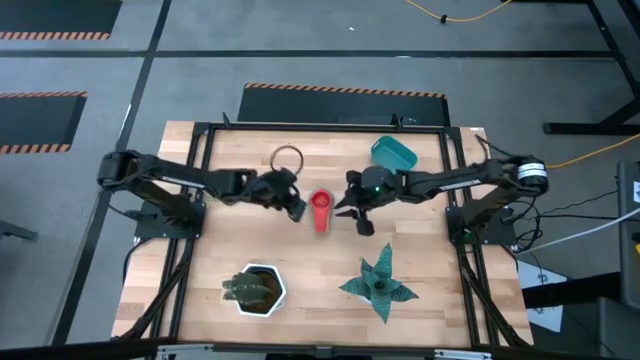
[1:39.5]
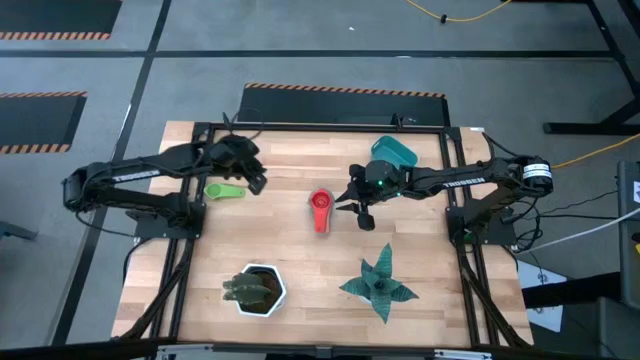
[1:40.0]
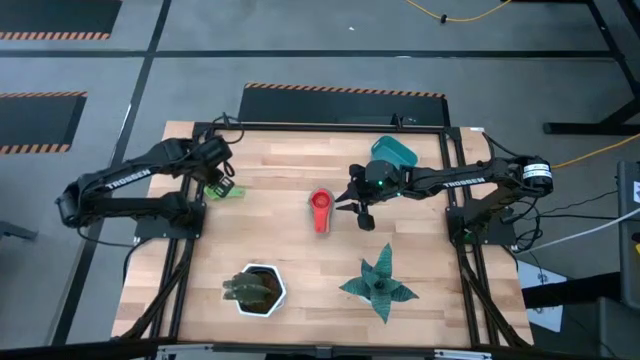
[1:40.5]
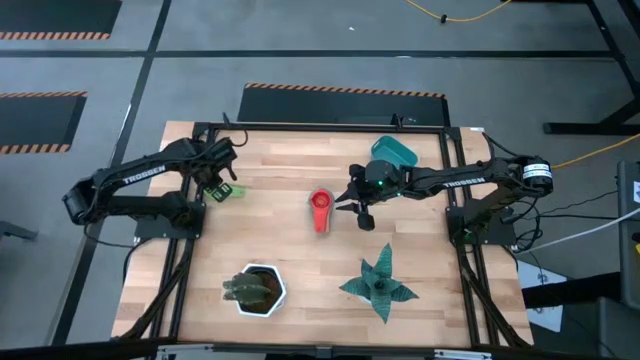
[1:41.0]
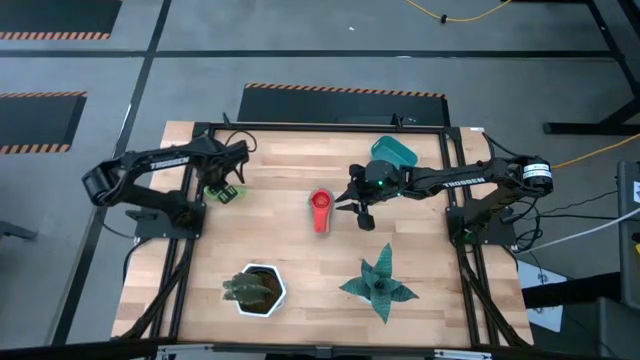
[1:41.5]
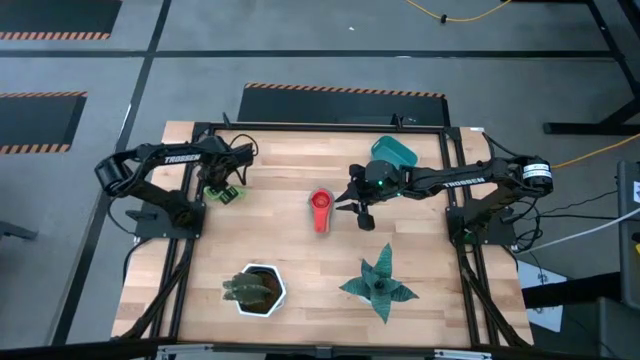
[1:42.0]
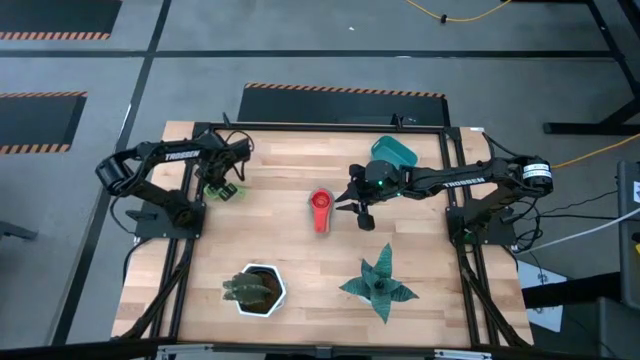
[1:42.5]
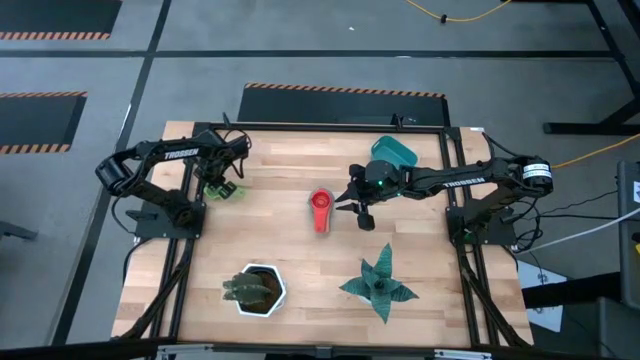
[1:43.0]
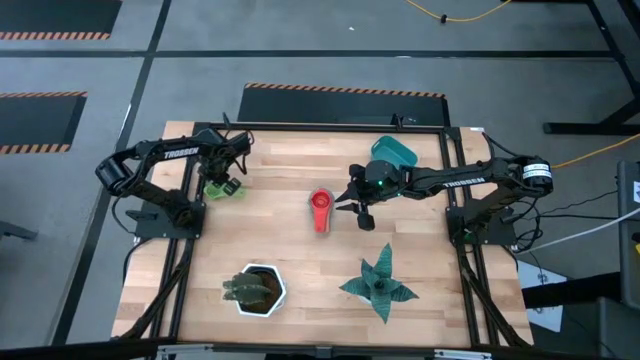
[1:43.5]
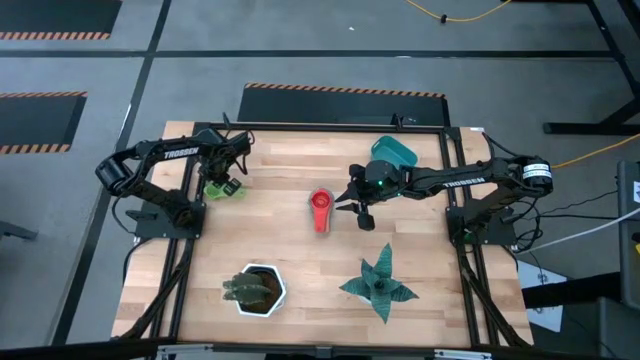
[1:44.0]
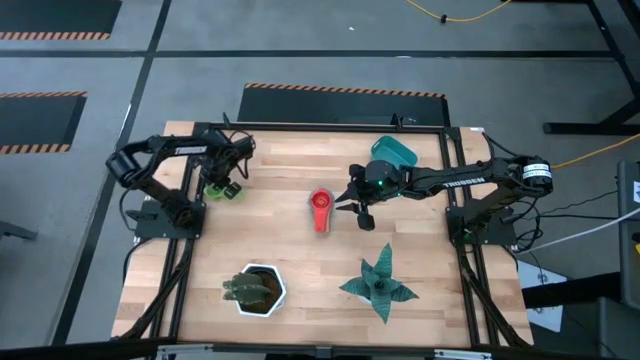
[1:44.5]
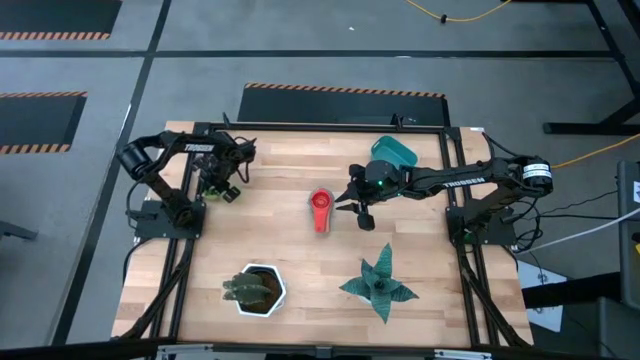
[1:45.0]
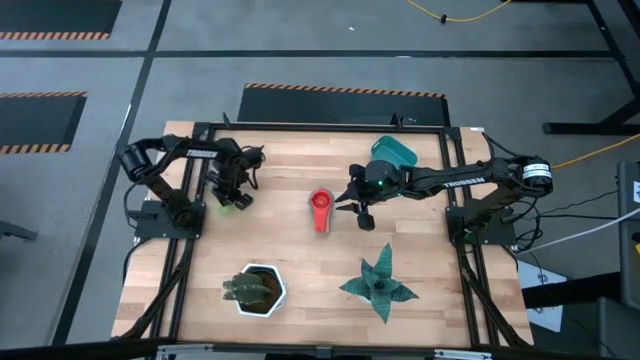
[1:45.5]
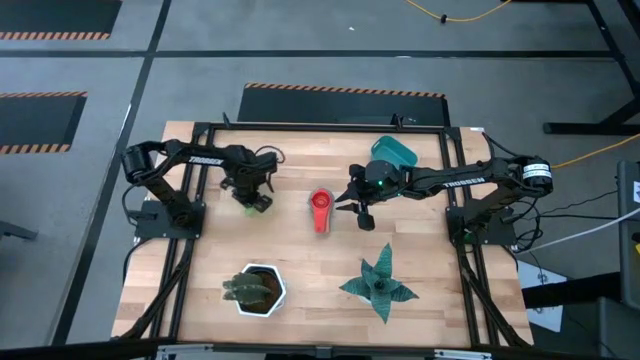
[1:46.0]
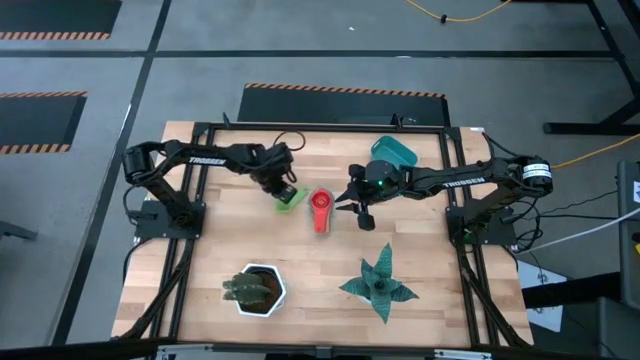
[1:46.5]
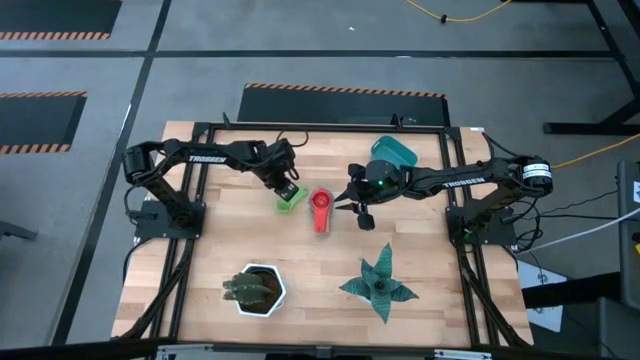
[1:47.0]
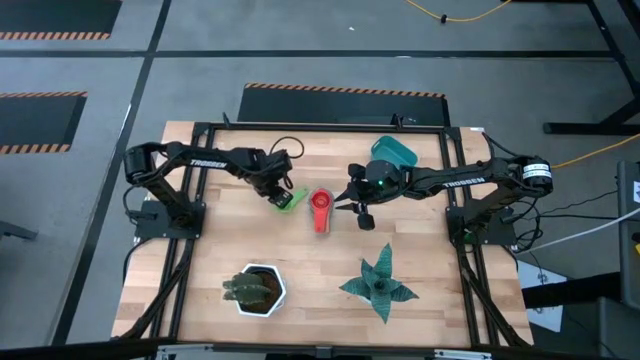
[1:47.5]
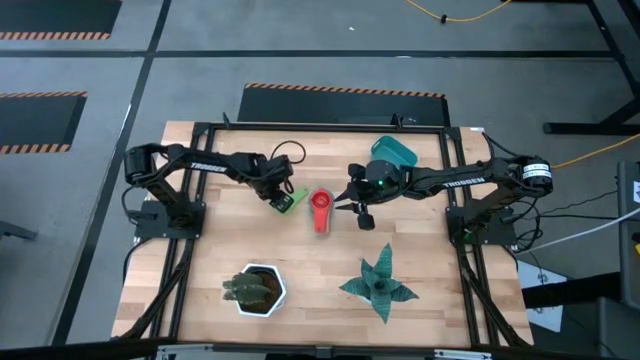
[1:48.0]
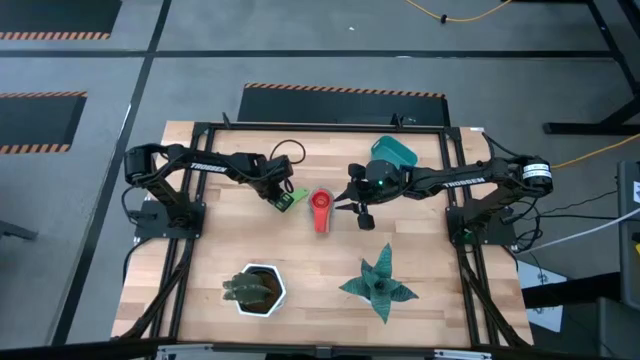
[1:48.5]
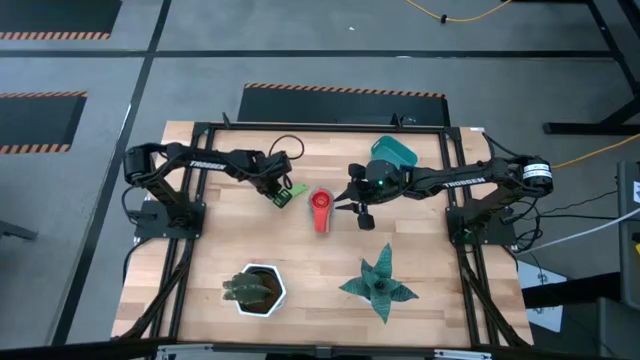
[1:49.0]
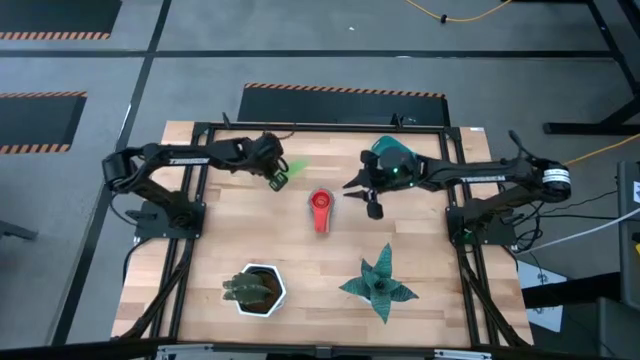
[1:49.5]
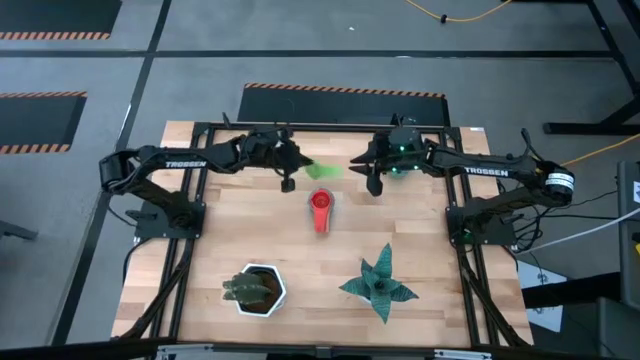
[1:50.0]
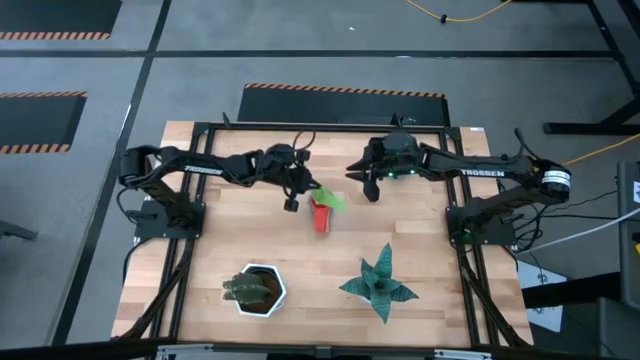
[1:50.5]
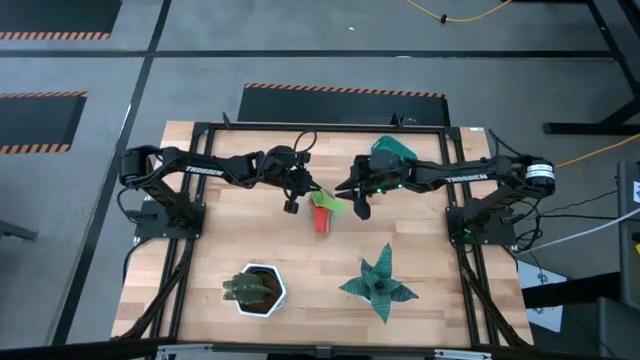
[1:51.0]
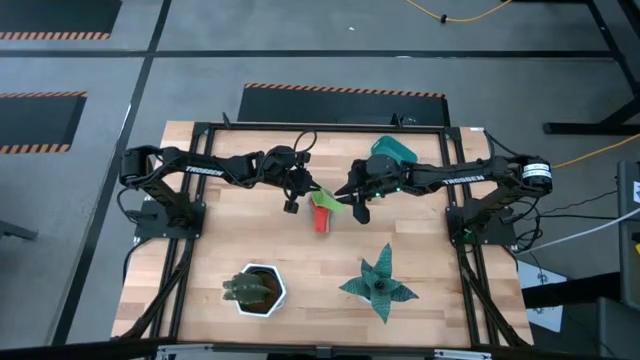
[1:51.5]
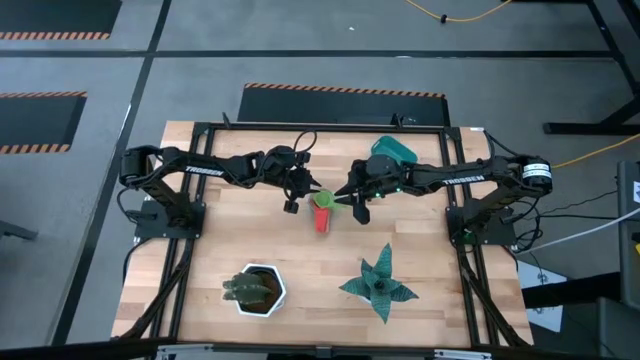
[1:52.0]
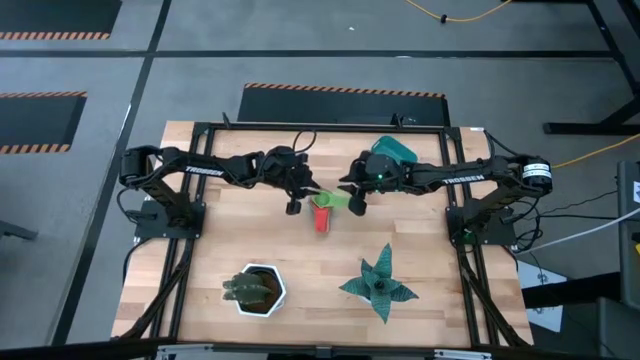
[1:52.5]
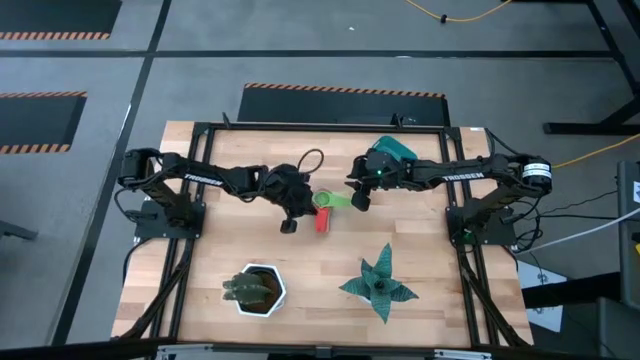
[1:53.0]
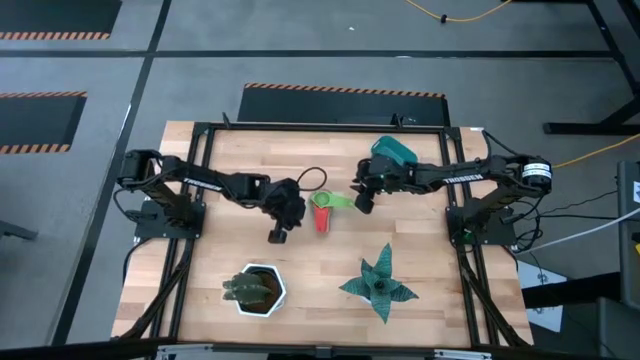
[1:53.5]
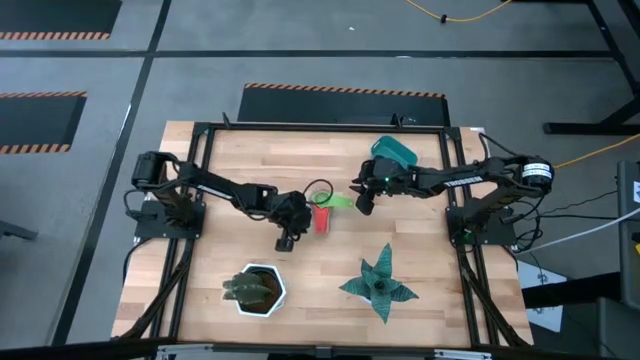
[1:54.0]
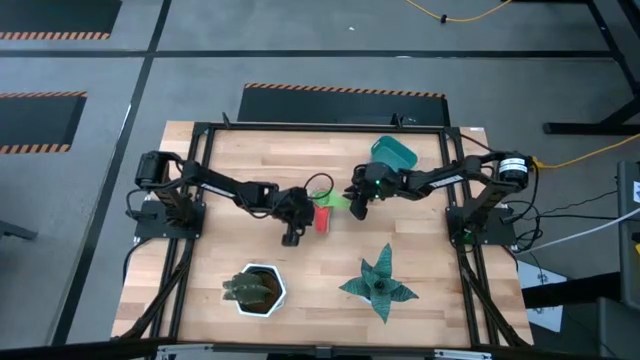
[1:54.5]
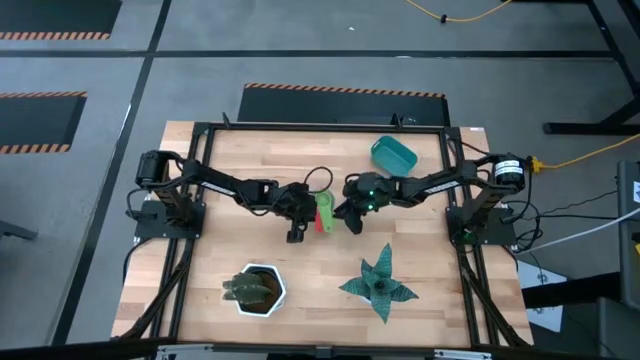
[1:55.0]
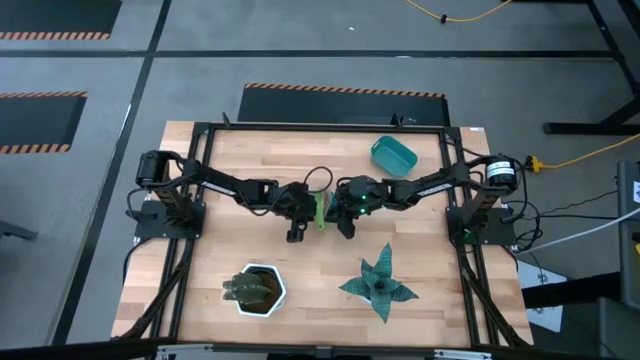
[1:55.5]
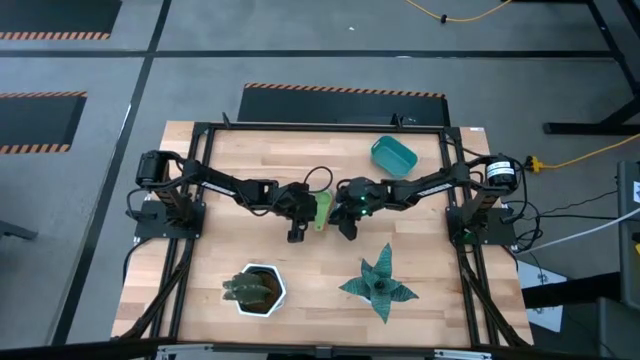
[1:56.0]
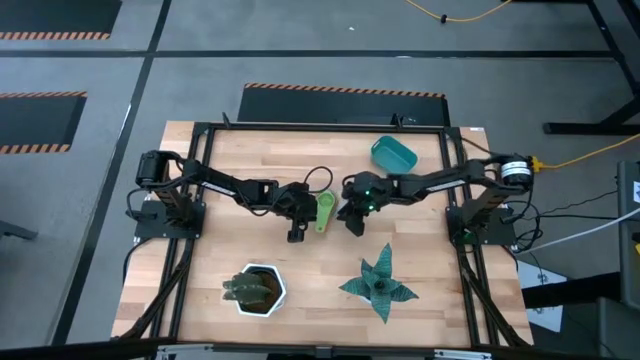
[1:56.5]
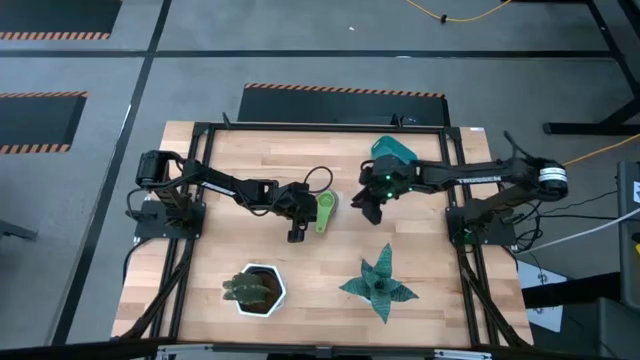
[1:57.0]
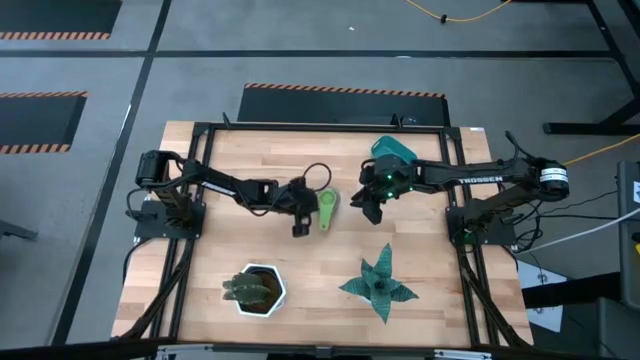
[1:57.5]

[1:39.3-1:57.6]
Task: Nest measuring cups in basket
Stack the light green measuring cup on top of the red measuring cup

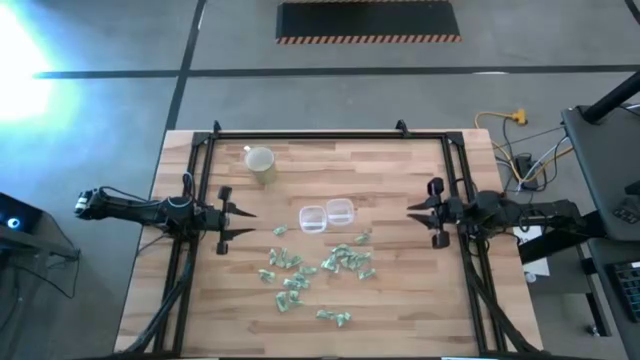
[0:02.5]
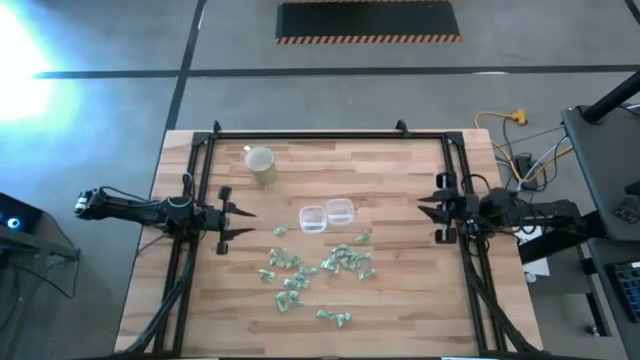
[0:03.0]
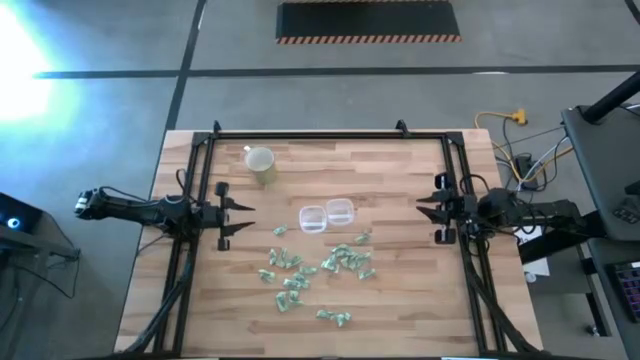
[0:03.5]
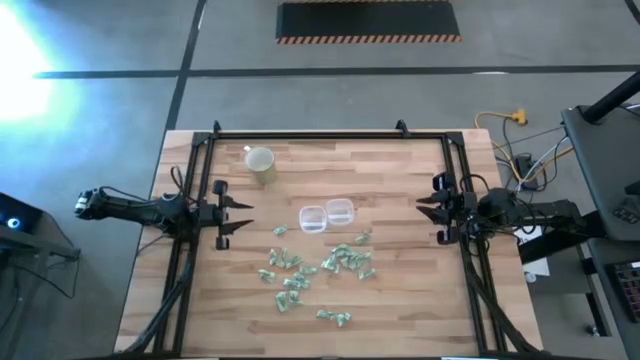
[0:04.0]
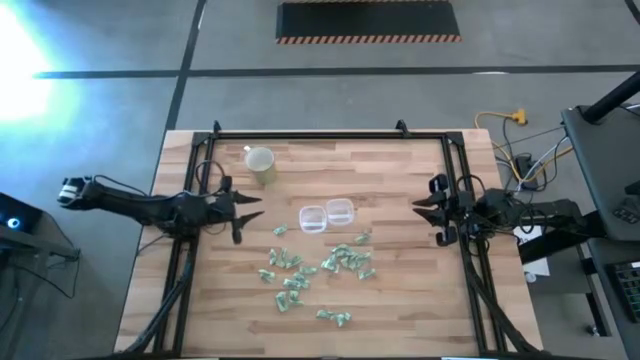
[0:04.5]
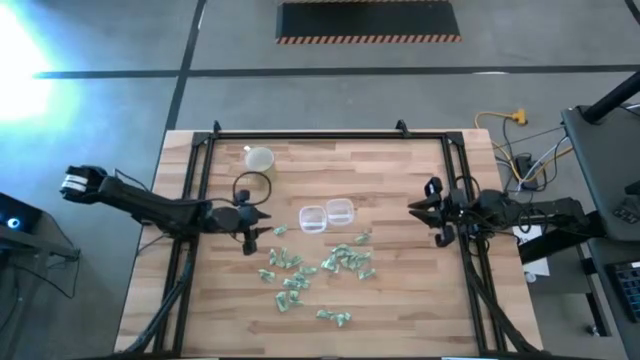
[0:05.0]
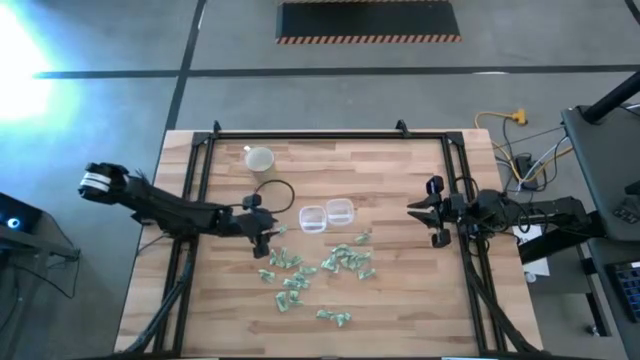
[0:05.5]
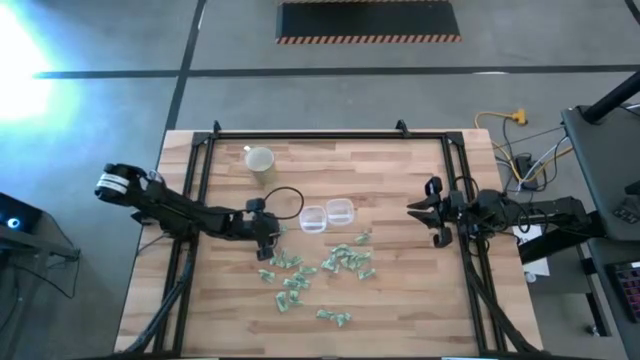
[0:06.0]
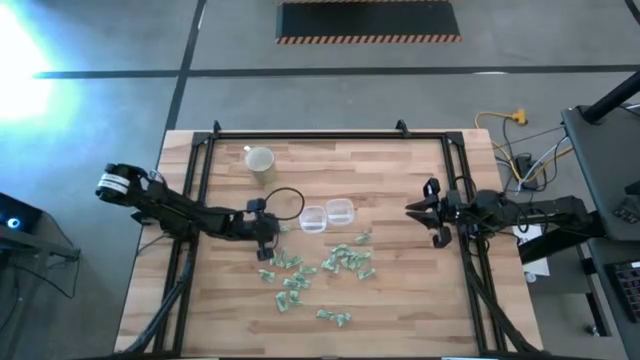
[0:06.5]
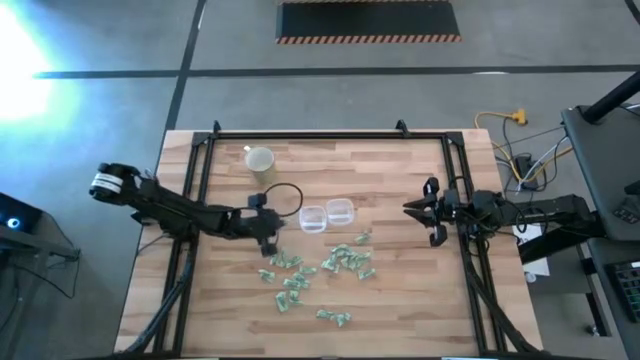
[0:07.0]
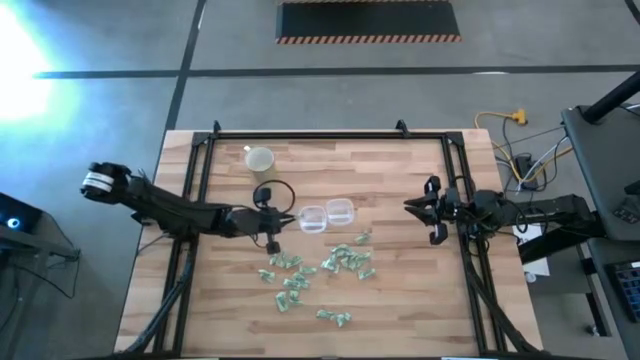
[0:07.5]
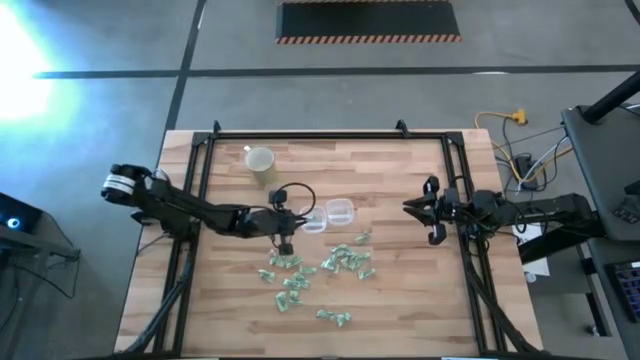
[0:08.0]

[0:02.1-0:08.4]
Task: Pick and place items into bin
Put the stevia packet into the left transparent bin
